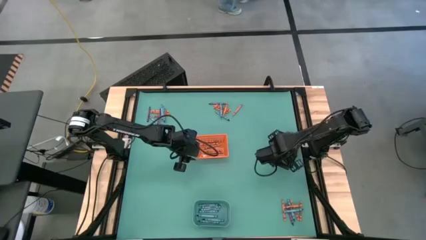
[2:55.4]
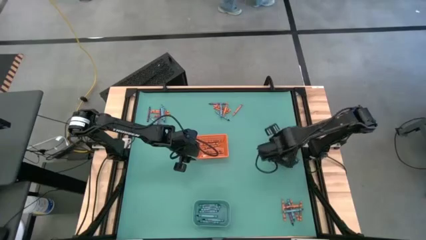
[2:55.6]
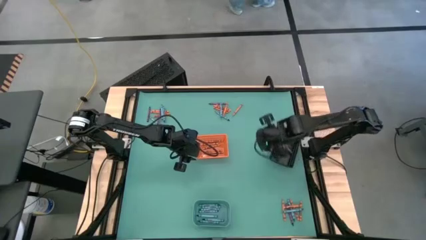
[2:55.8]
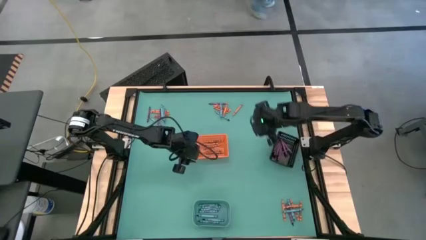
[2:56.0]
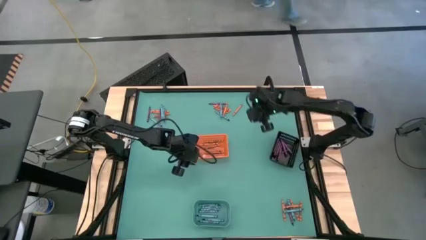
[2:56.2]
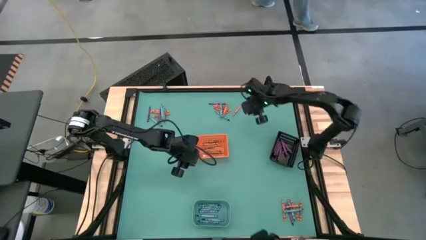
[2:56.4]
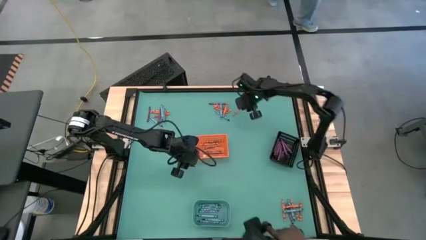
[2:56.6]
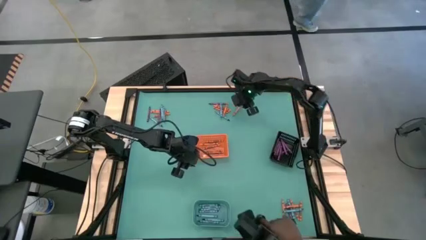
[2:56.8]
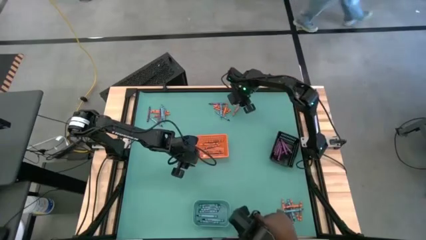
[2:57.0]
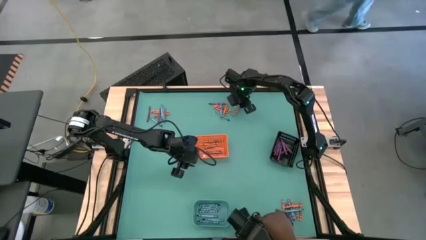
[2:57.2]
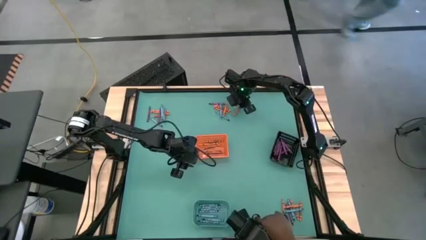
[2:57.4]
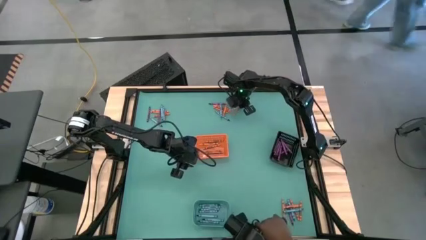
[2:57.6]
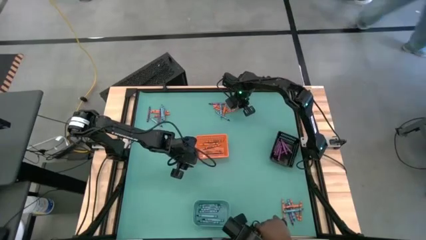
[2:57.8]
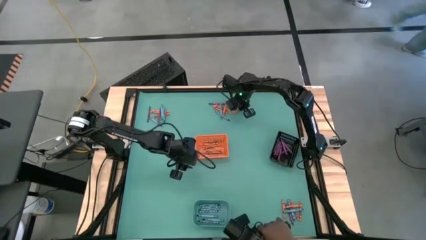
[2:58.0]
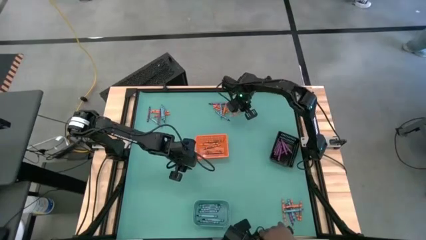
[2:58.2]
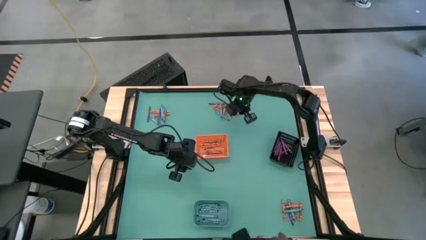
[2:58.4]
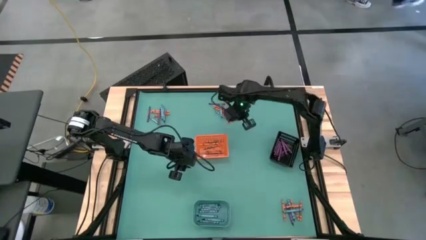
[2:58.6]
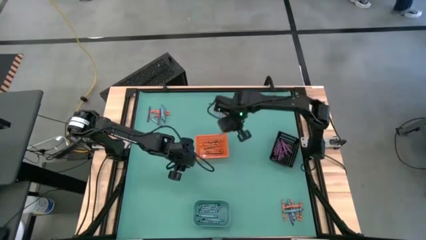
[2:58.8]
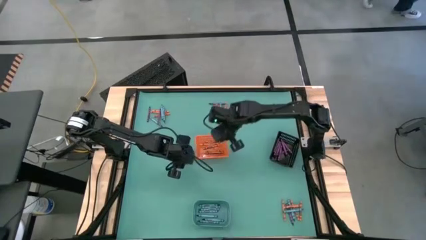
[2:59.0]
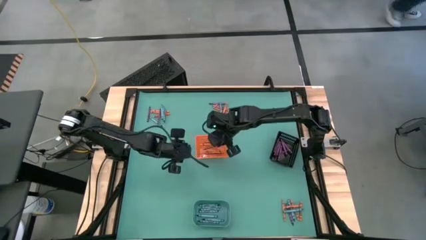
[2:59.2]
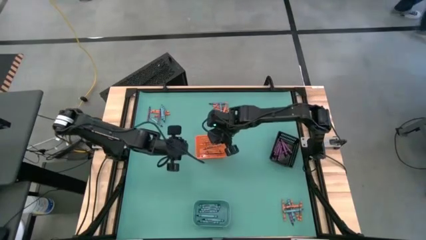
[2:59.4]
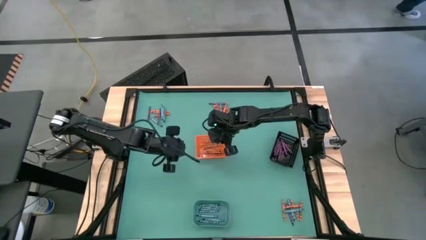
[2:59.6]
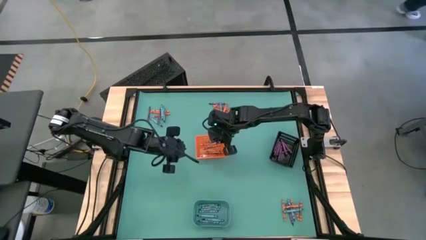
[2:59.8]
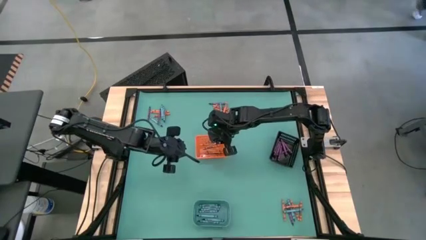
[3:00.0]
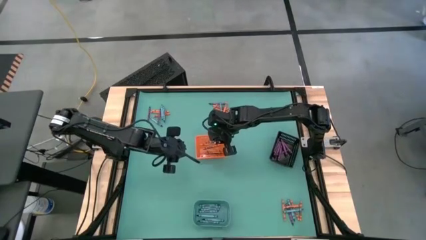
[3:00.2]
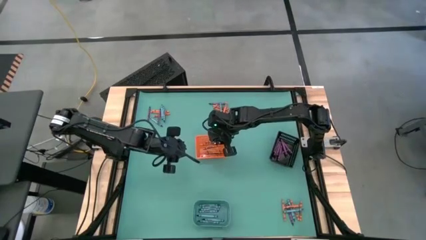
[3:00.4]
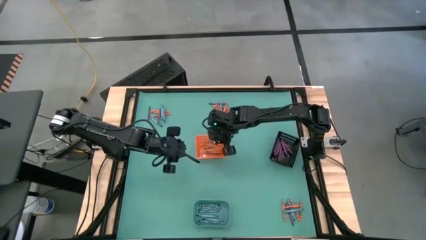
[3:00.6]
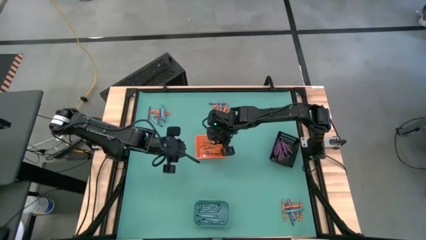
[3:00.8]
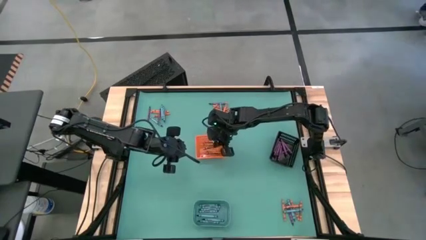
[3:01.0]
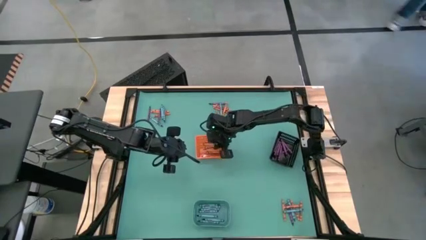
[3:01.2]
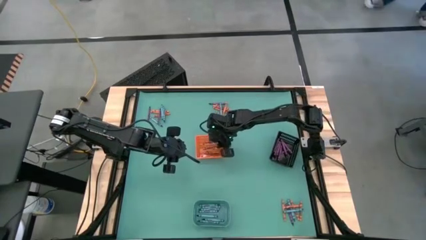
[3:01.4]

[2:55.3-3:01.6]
Task: Sort crayons
Put the orange crayon into the orange bin

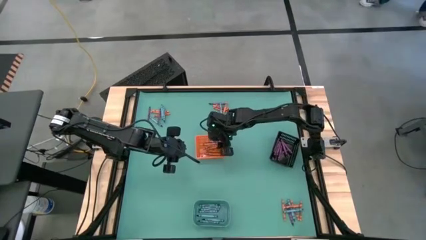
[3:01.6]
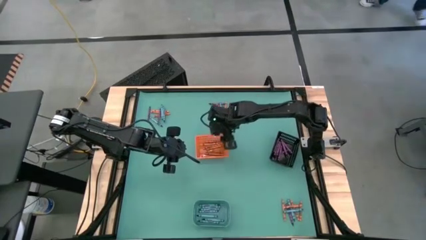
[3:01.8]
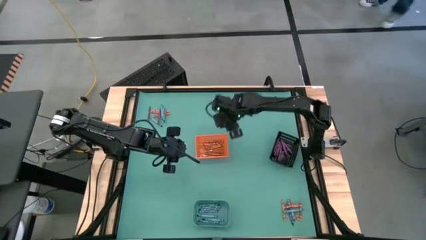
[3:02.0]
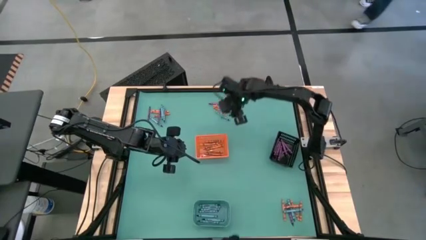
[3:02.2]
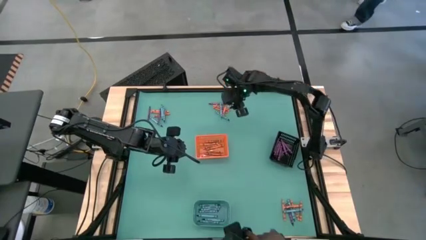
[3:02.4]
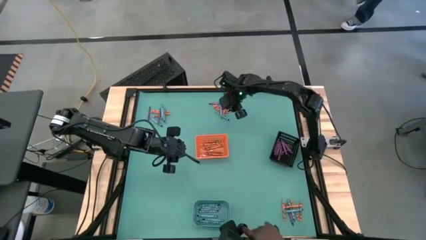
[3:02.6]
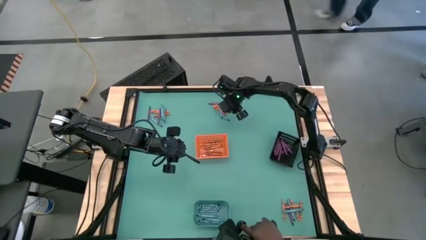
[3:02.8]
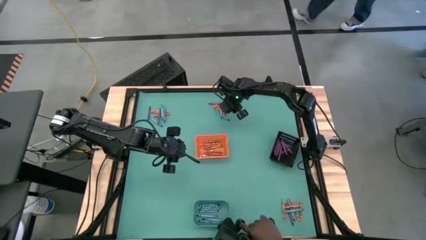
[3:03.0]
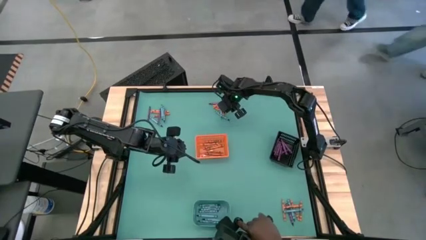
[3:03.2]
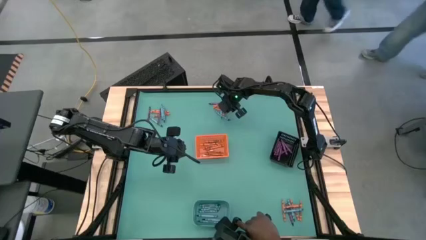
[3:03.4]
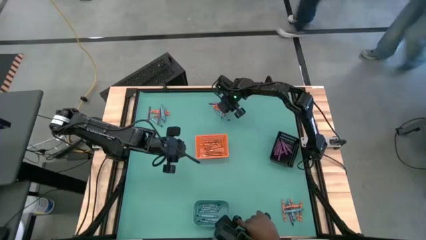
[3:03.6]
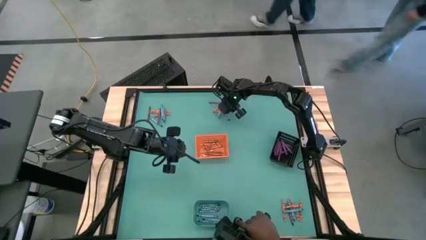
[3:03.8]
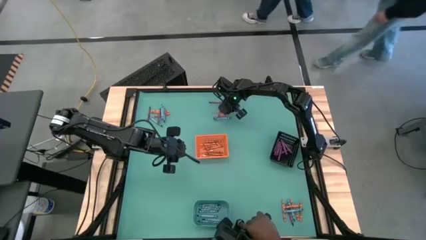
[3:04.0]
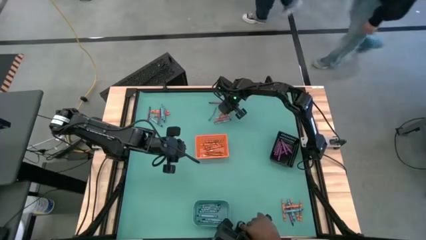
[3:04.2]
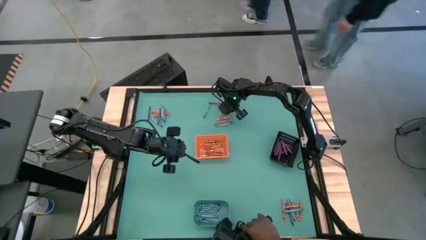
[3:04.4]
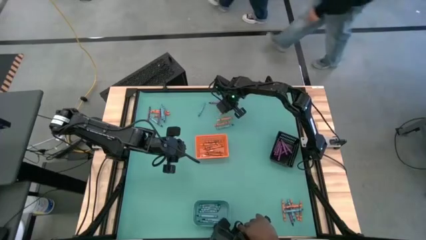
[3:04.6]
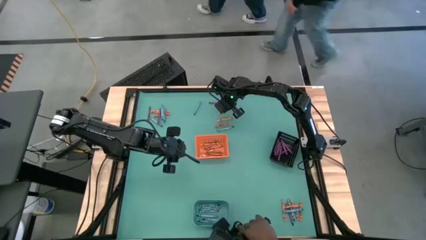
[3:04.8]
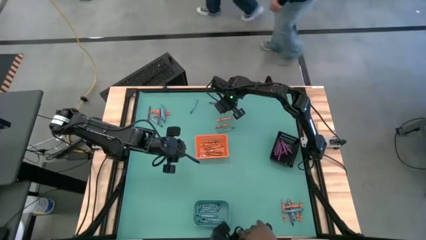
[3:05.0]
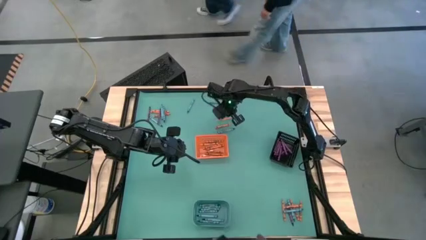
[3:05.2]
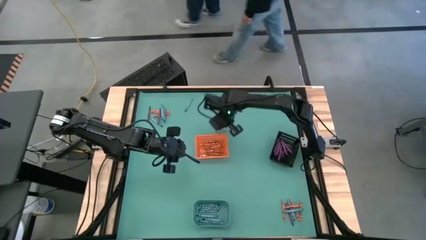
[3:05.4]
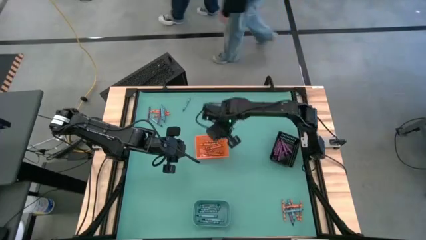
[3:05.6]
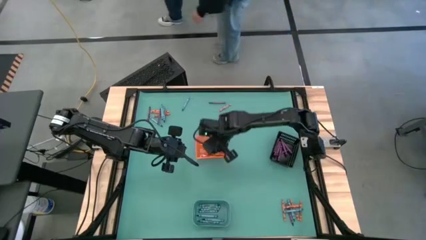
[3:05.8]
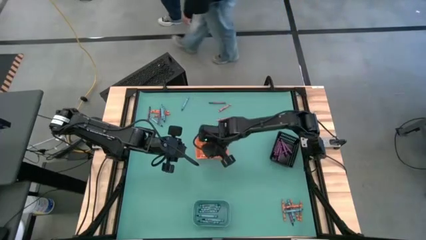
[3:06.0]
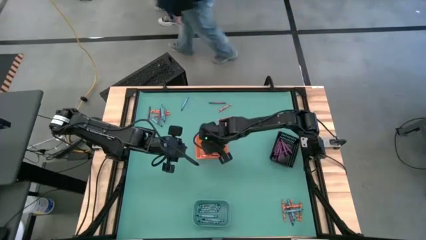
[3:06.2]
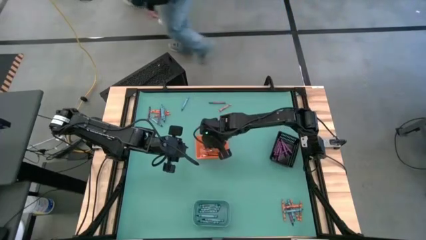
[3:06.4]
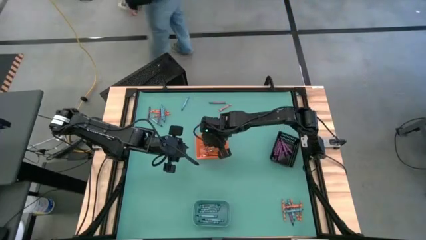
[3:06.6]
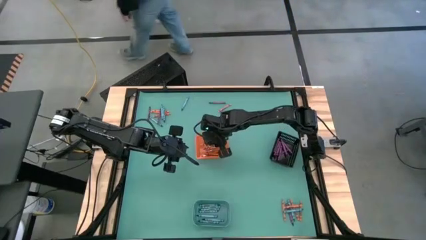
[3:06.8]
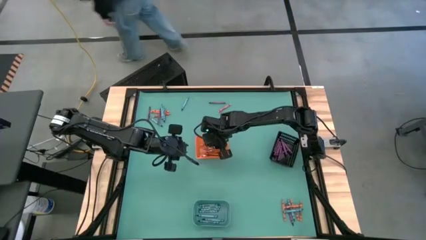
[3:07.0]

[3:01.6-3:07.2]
Put the orange crayon into the orange bin

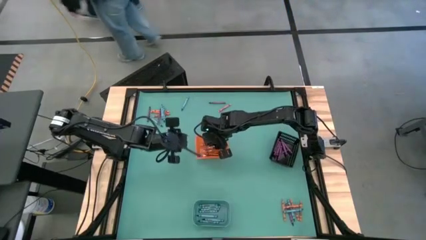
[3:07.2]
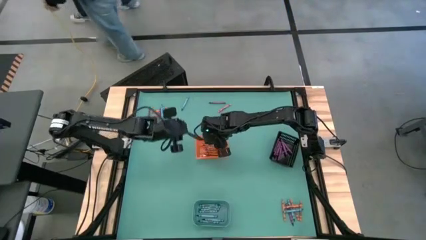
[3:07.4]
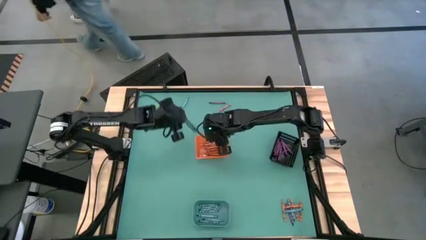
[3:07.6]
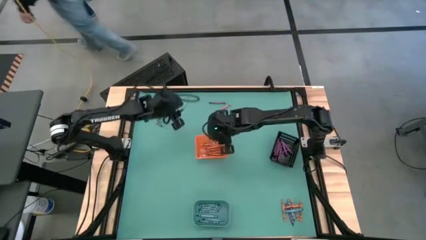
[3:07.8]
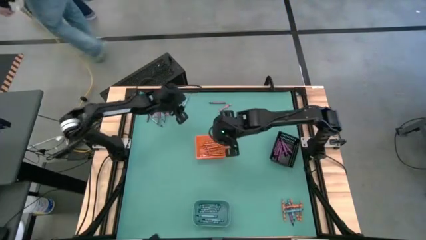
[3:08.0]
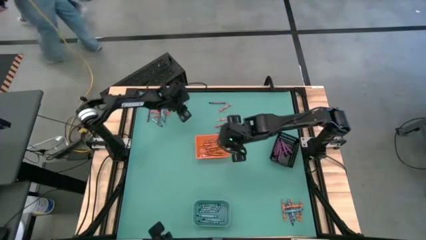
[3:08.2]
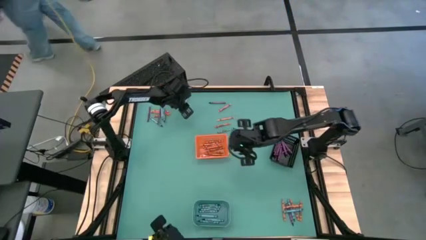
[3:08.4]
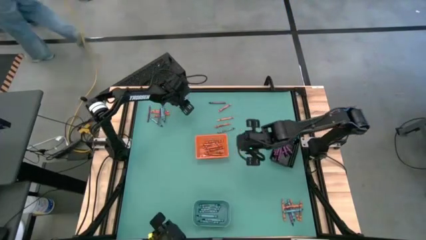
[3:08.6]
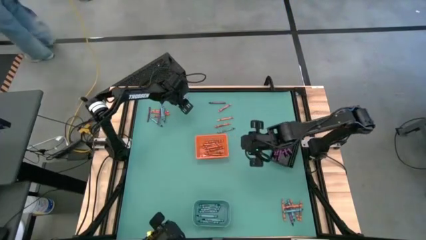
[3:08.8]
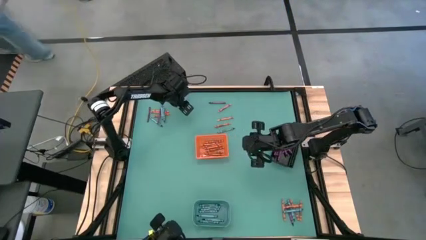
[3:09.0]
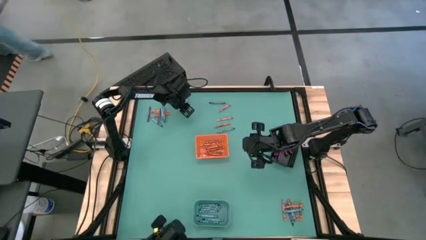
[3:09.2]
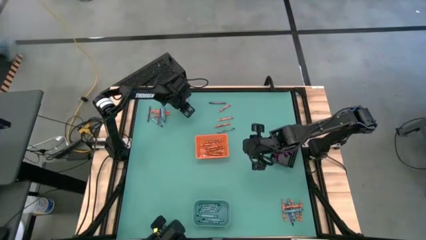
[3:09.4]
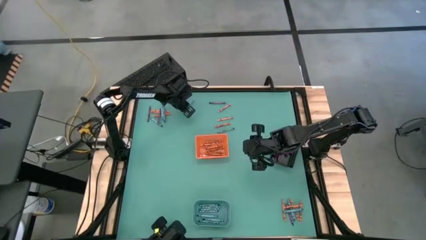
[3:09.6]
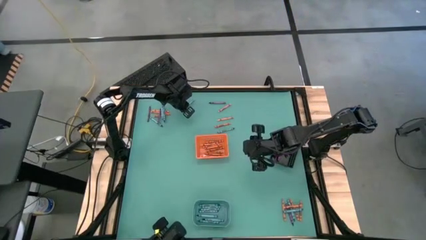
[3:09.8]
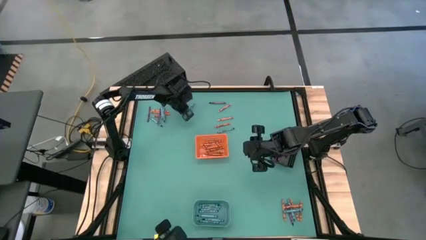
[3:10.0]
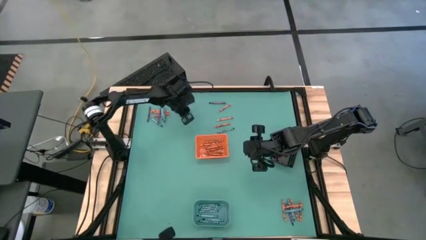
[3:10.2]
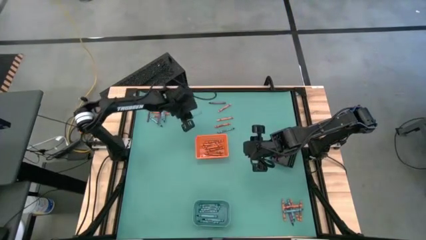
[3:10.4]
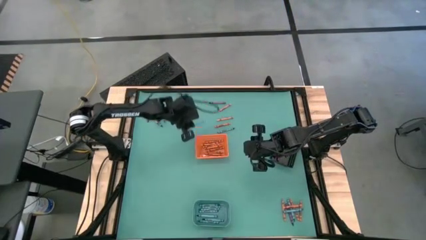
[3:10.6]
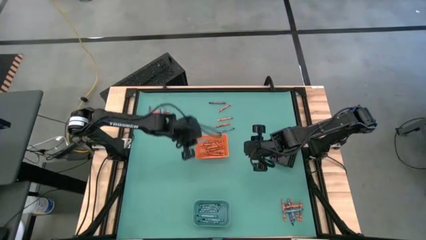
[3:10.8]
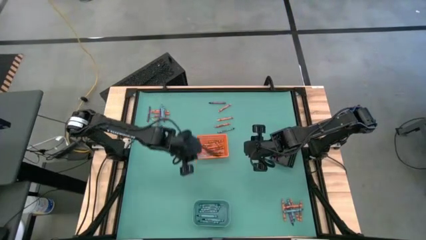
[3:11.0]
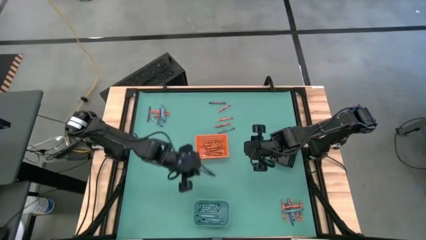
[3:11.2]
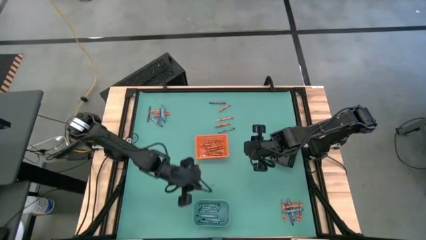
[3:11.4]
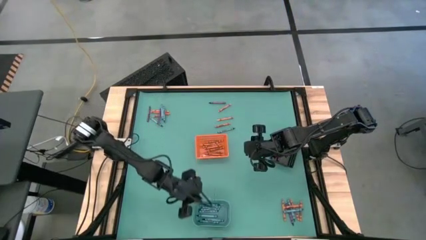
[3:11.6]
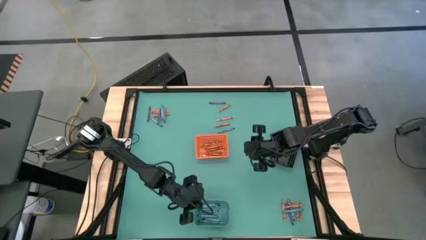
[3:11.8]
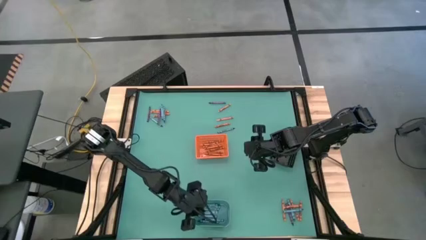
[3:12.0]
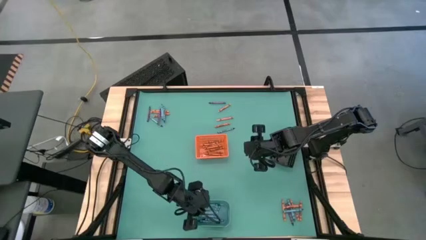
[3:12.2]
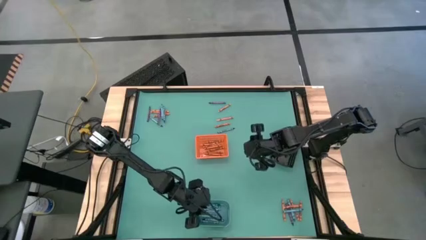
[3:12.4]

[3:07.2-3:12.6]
Put the blue crayon into the blue bin
